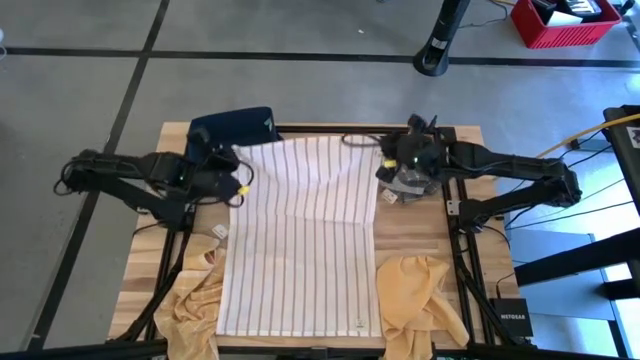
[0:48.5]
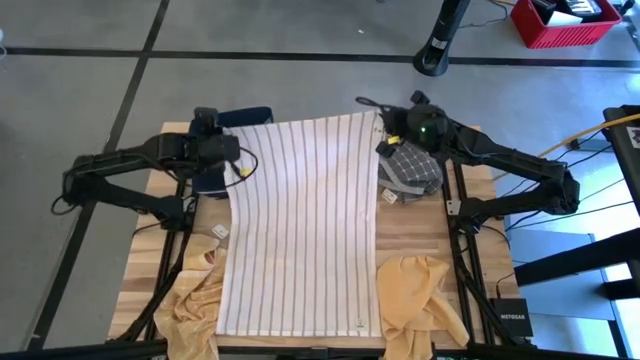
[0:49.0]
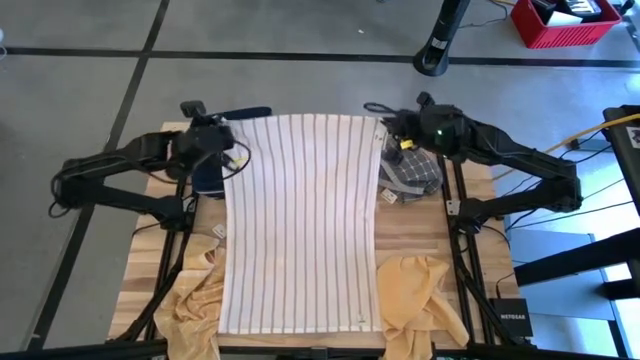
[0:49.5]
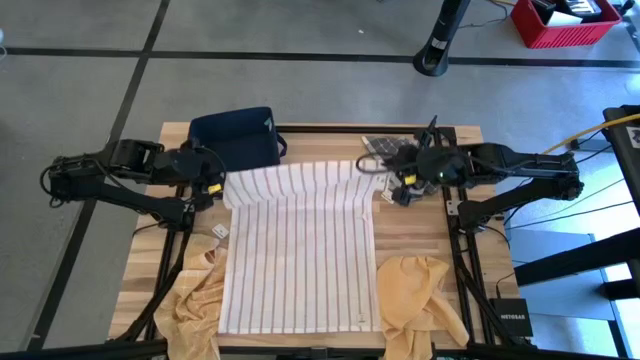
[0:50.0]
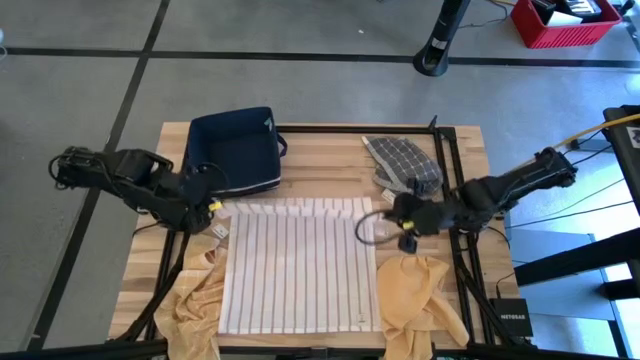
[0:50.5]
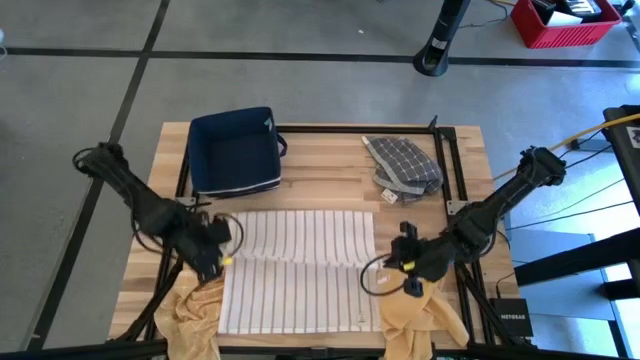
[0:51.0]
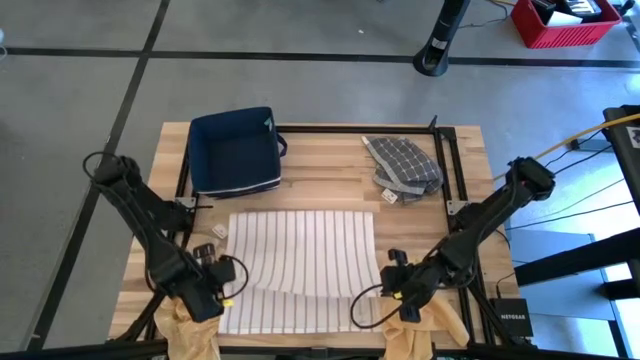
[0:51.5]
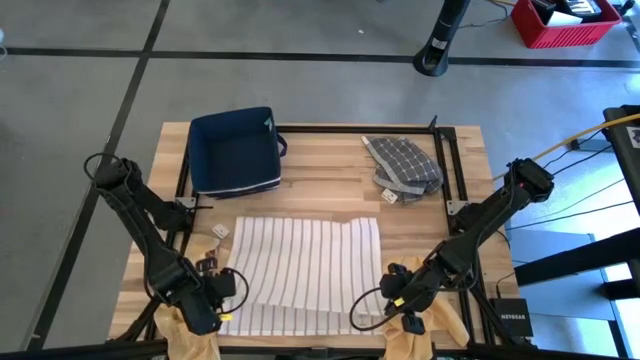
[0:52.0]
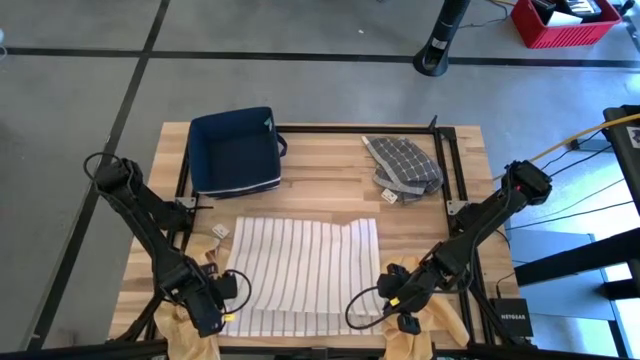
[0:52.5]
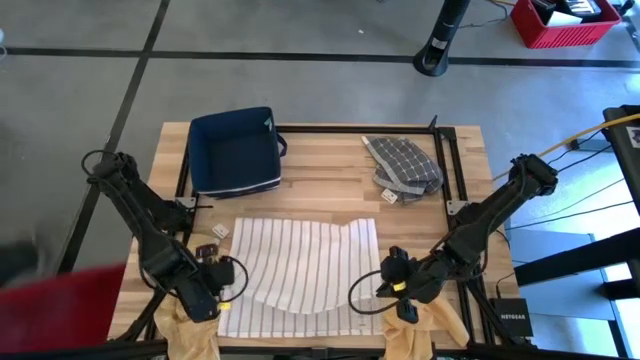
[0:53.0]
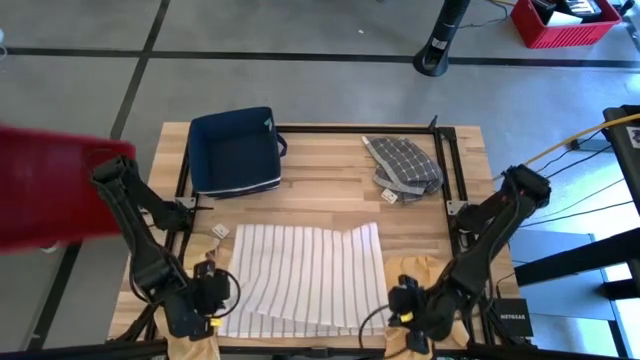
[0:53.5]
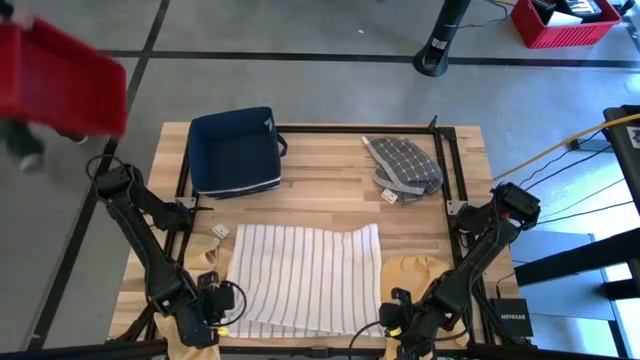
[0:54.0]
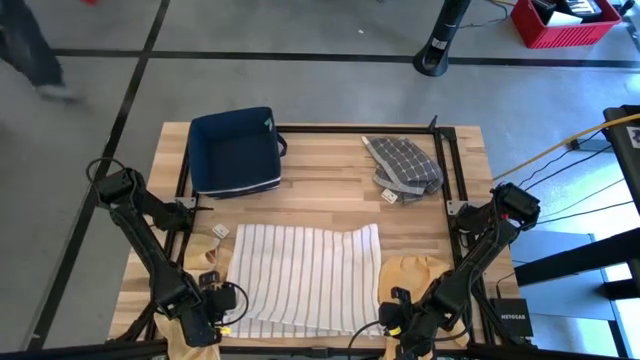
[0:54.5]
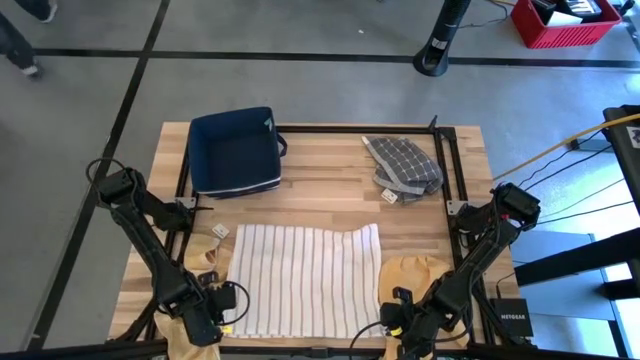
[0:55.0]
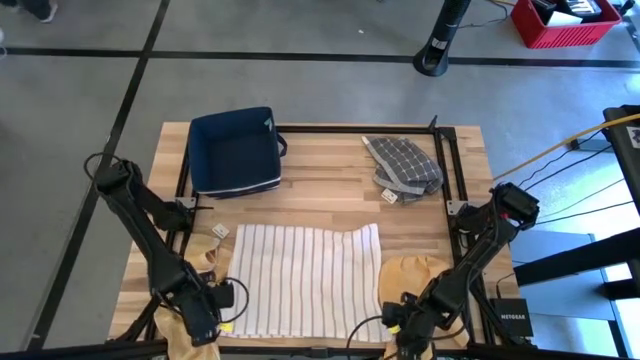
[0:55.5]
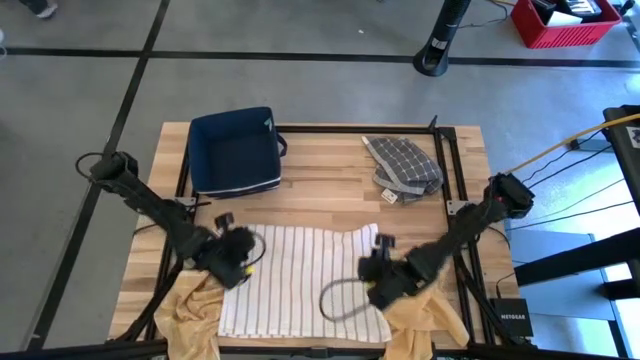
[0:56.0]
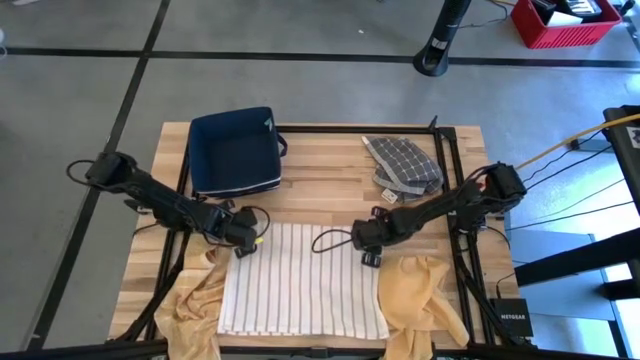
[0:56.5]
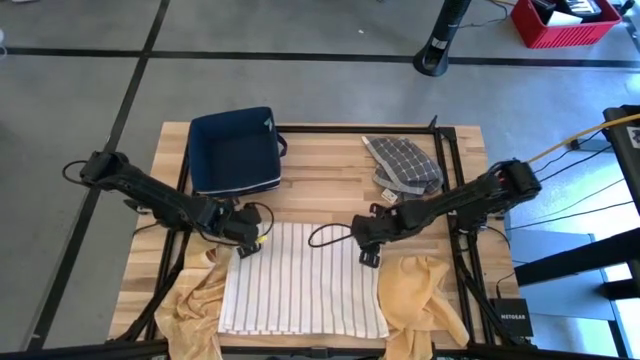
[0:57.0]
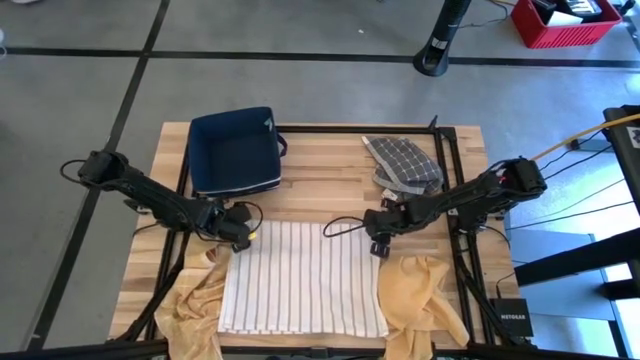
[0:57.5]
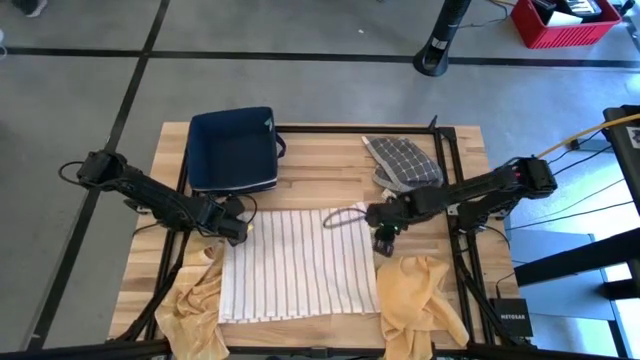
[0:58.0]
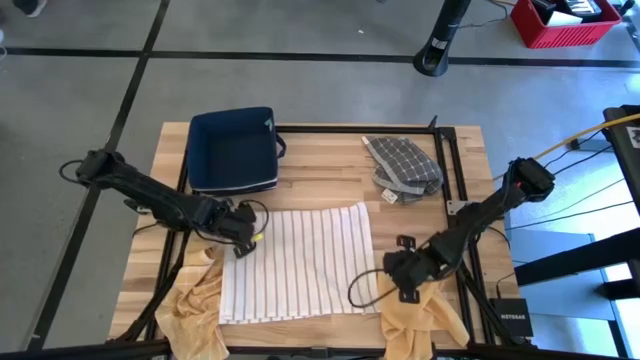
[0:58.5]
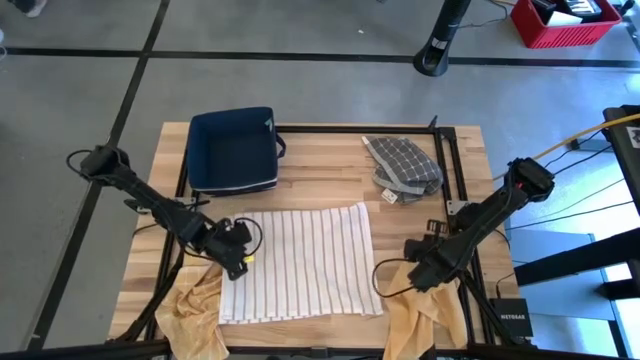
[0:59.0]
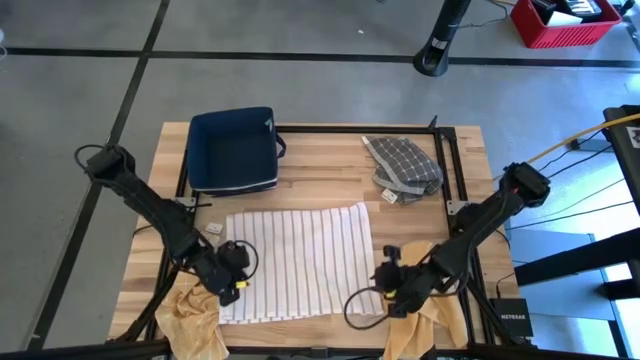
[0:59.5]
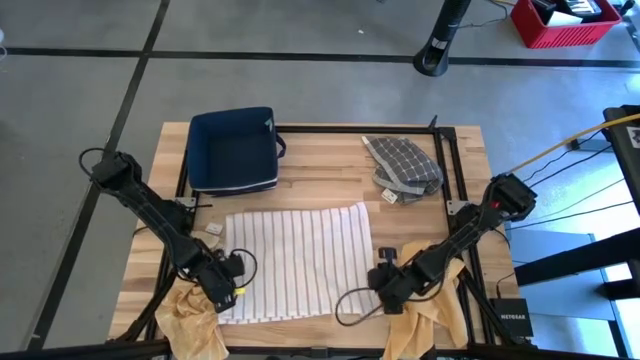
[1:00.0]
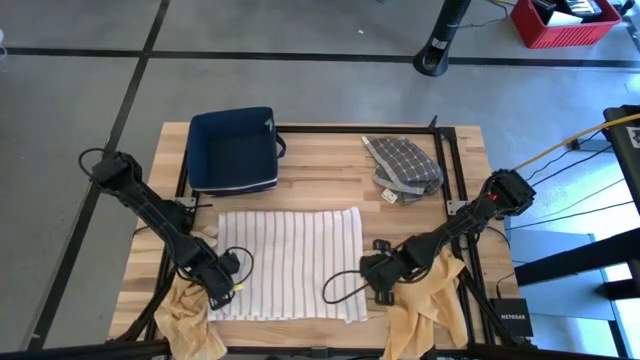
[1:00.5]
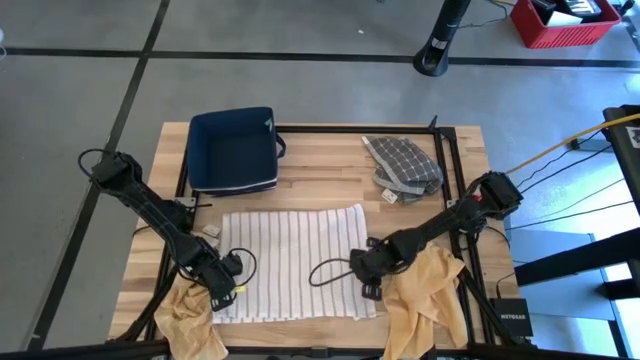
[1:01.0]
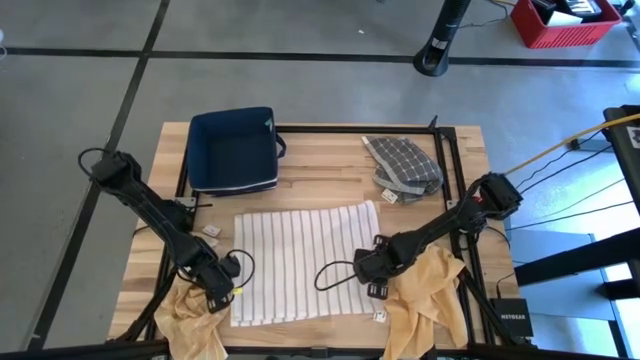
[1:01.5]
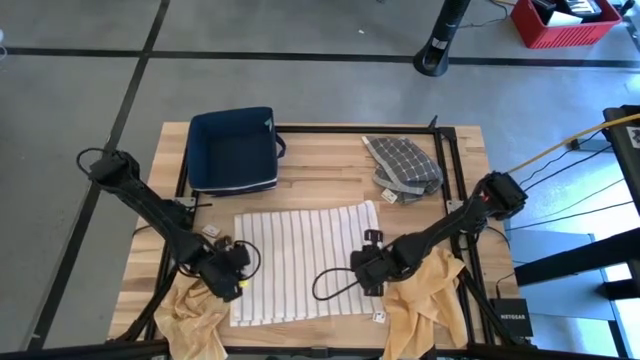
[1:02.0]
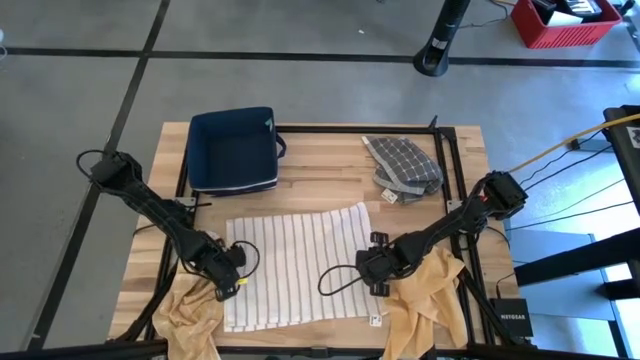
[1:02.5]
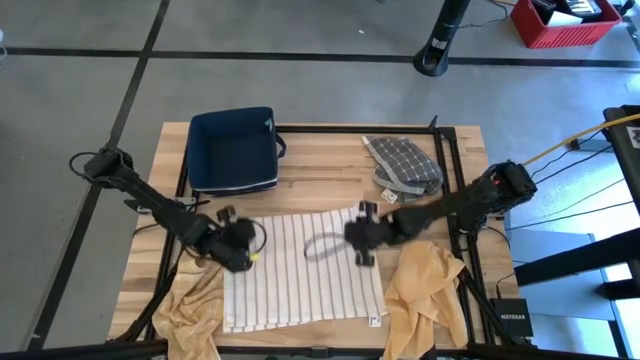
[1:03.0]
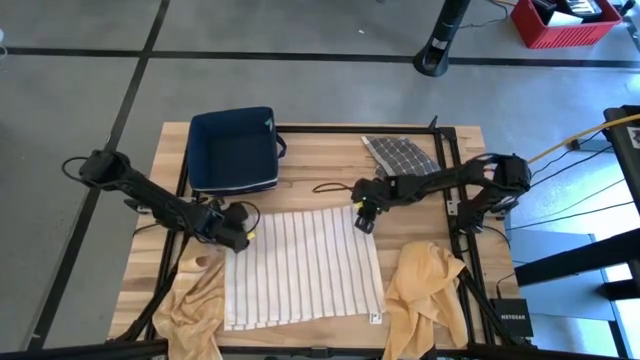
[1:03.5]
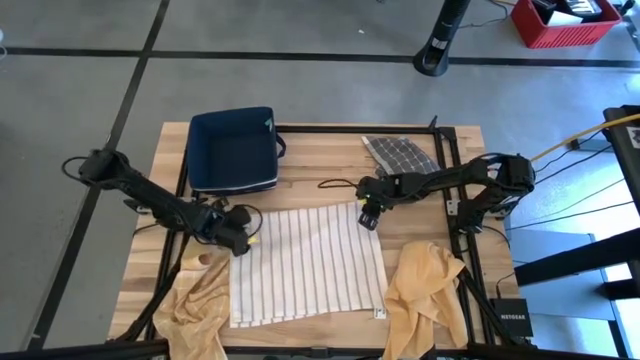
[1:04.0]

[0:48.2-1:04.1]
Task: Fold towel
Fold the white towel

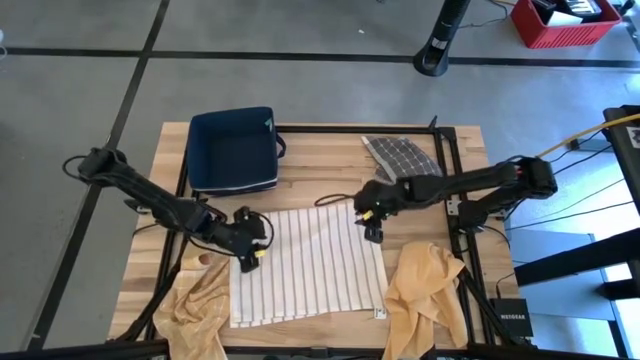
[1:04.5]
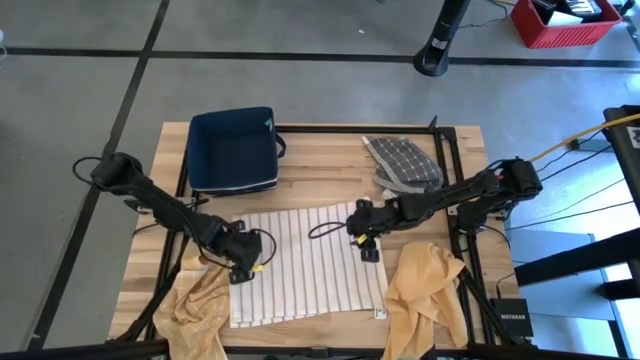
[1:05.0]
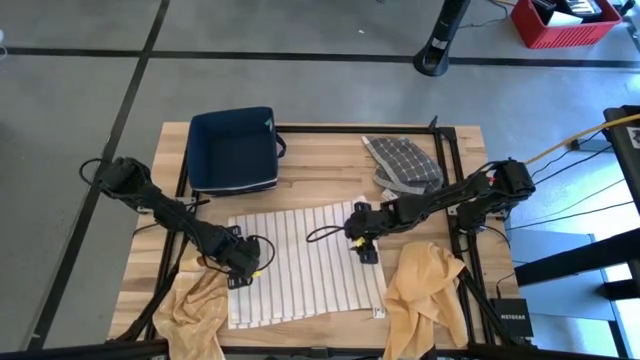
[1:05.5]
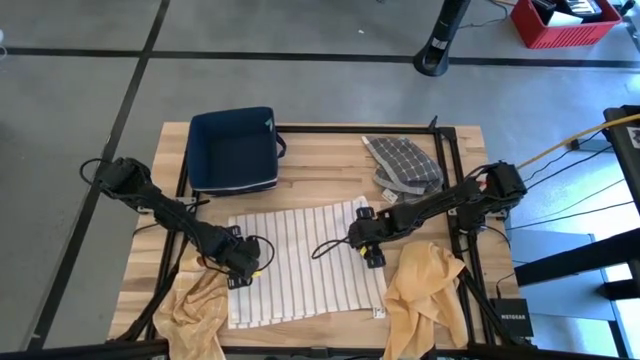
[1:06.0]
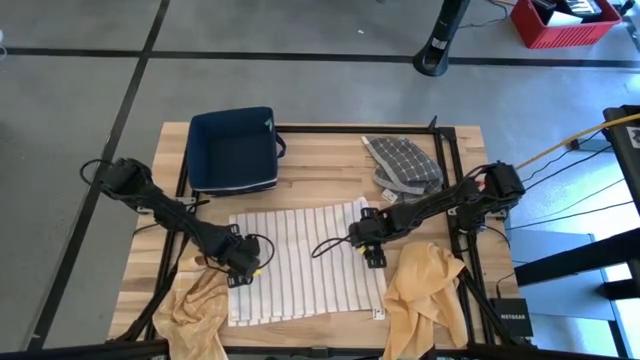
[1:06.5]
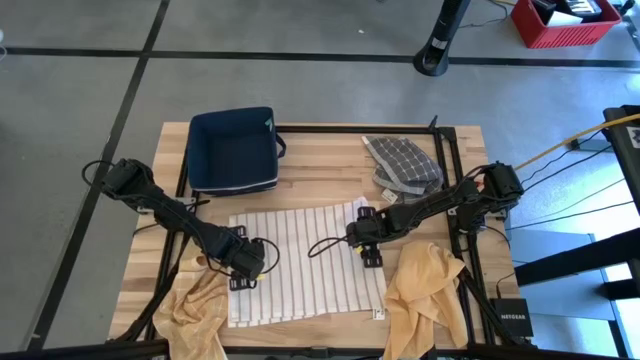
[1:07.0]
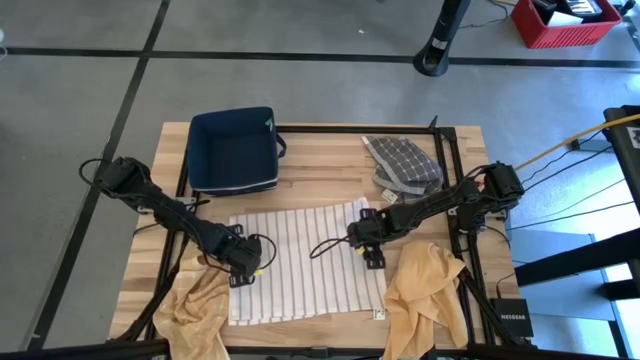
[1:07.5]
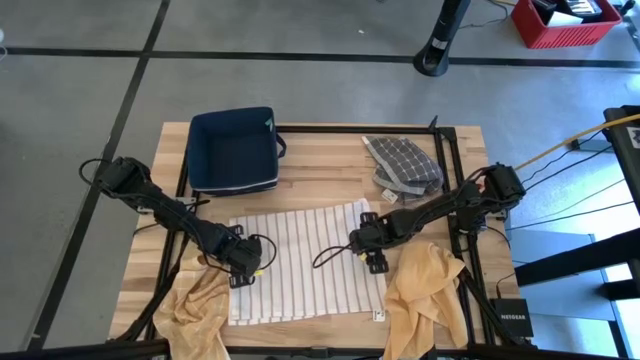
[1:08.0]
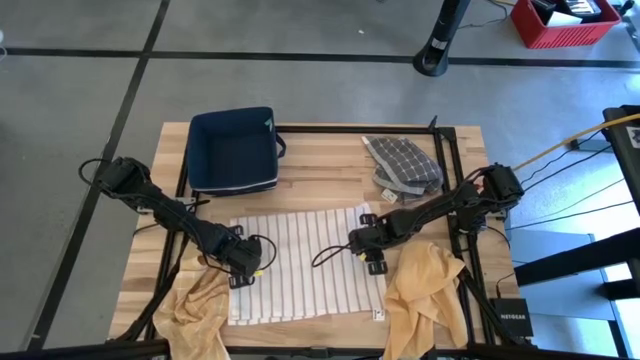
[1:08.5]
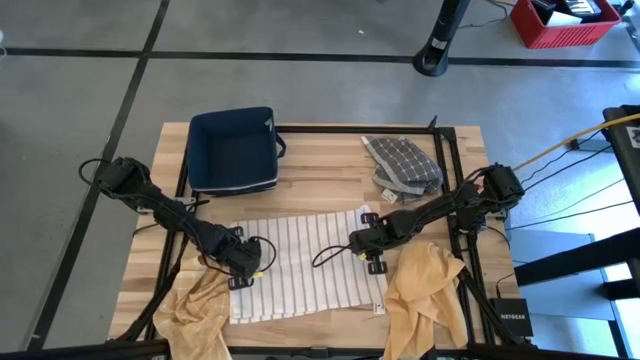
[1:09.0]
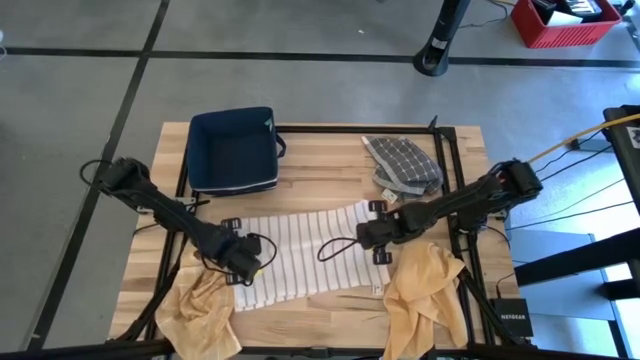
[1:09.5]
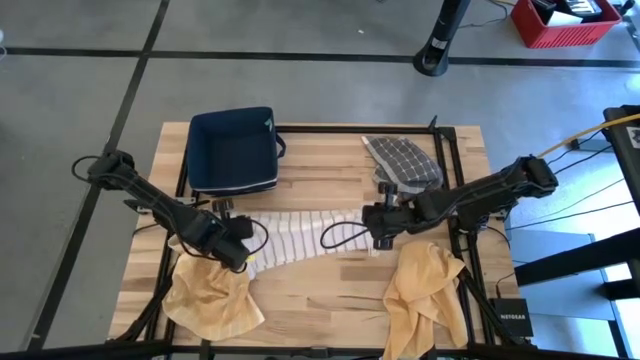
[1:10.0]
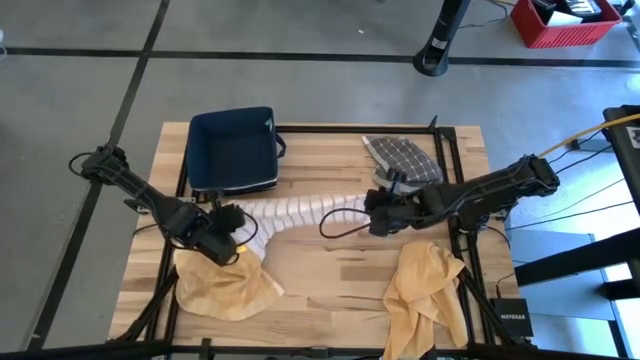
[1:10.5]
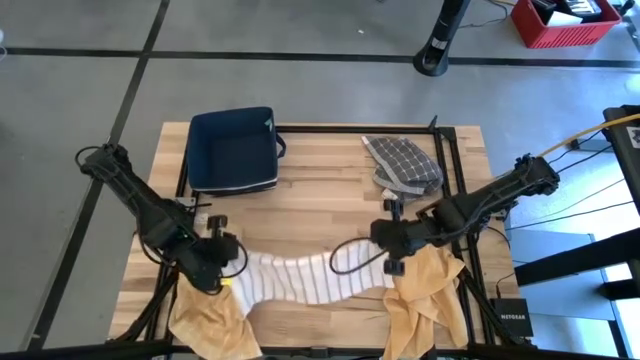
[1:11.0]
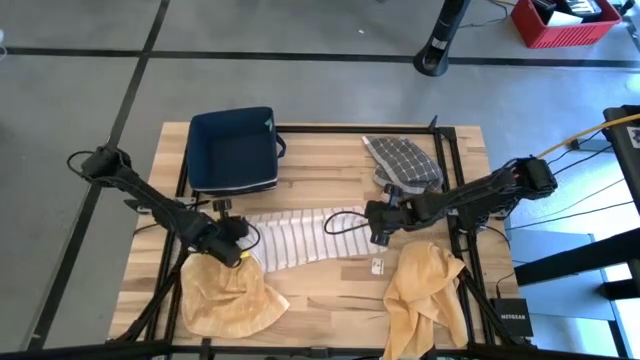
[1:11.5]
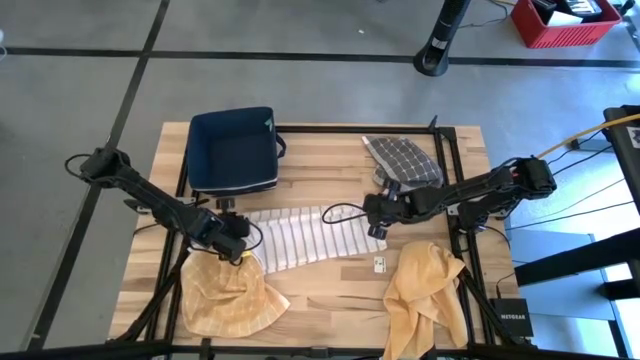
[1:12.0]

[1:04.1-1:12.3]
Fold the white towel
